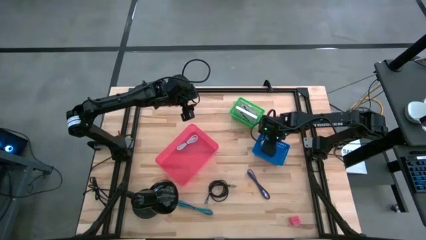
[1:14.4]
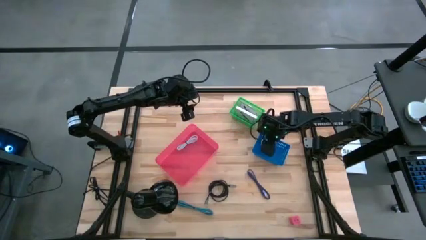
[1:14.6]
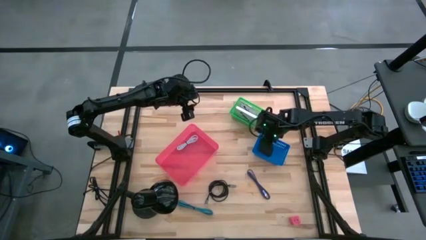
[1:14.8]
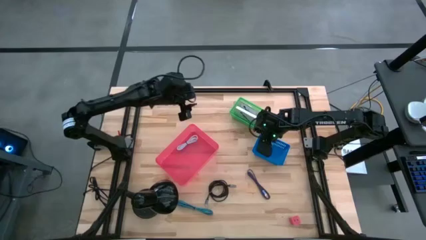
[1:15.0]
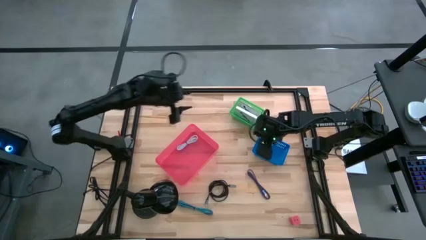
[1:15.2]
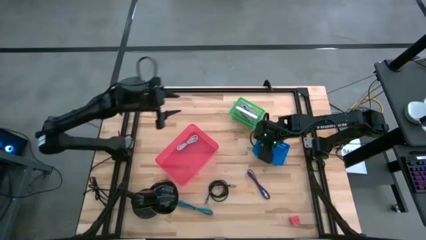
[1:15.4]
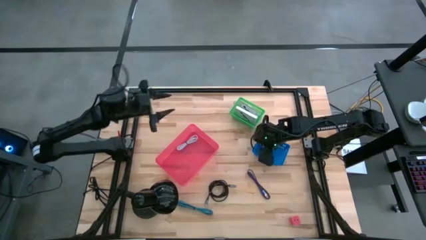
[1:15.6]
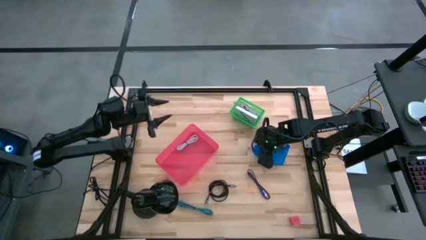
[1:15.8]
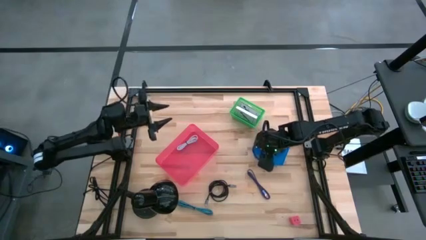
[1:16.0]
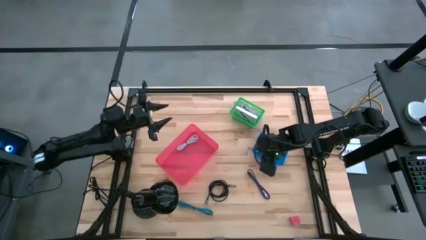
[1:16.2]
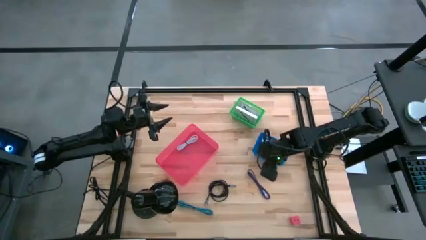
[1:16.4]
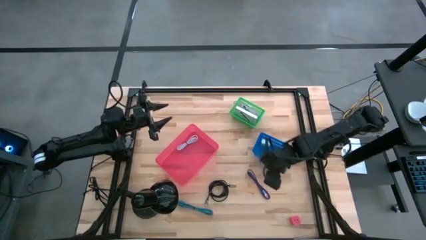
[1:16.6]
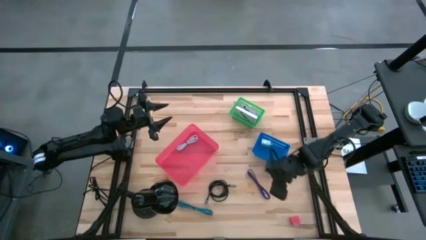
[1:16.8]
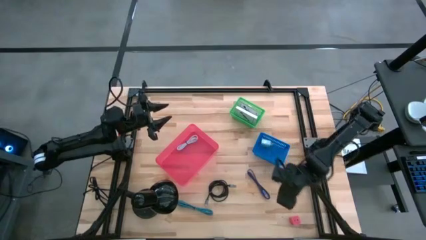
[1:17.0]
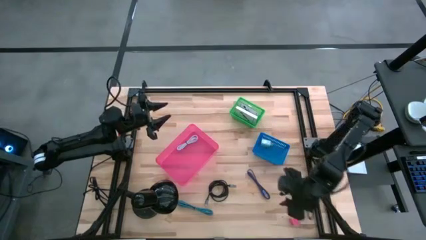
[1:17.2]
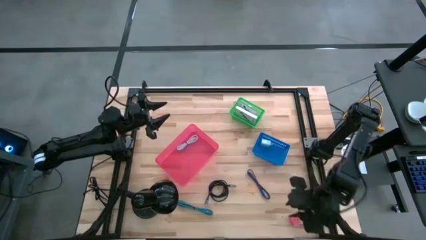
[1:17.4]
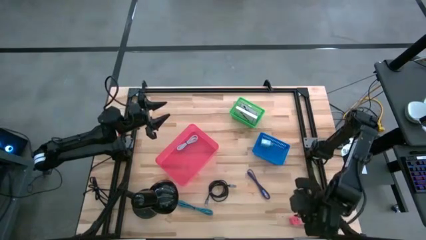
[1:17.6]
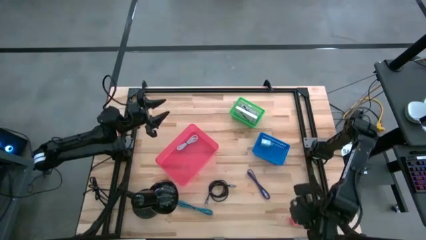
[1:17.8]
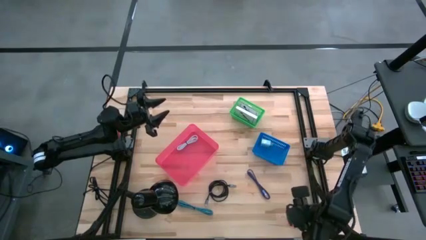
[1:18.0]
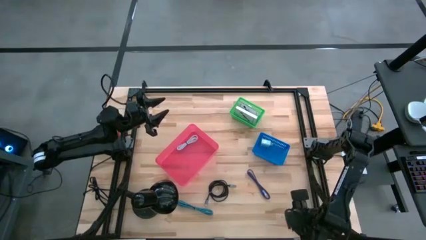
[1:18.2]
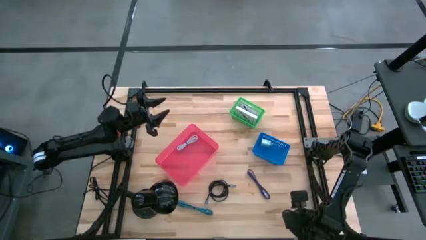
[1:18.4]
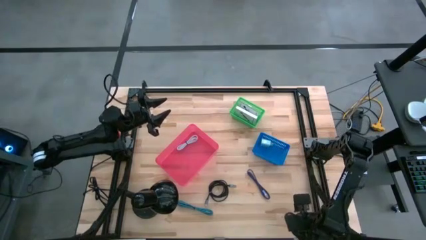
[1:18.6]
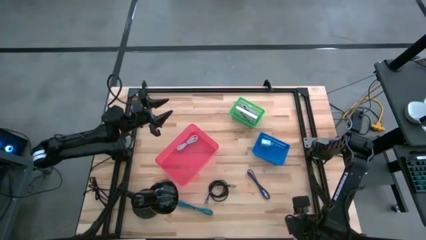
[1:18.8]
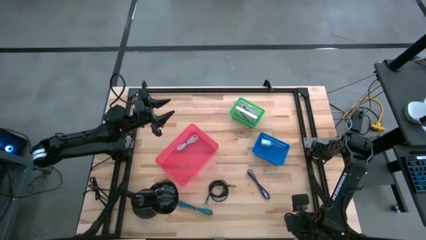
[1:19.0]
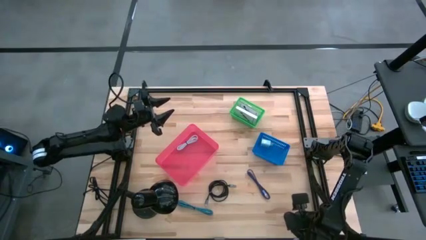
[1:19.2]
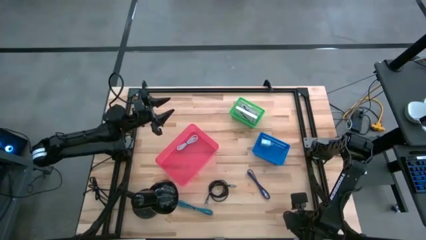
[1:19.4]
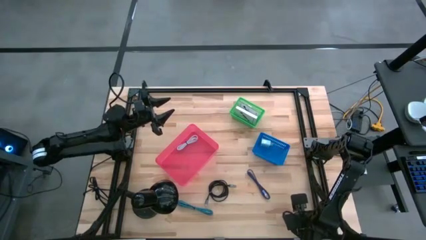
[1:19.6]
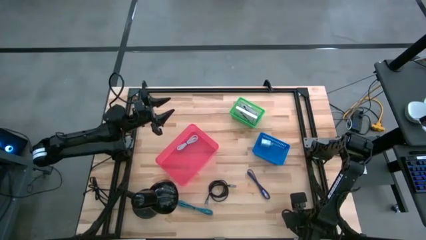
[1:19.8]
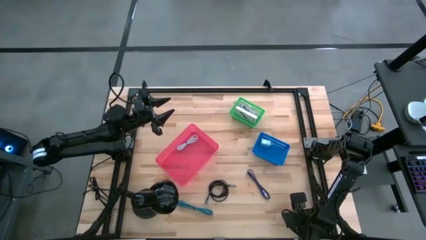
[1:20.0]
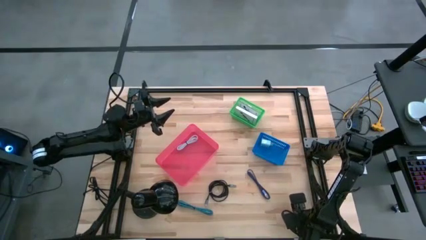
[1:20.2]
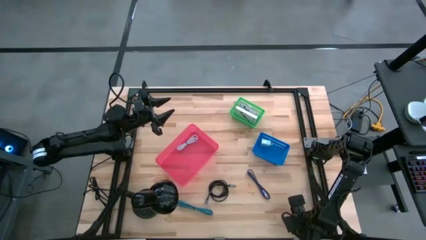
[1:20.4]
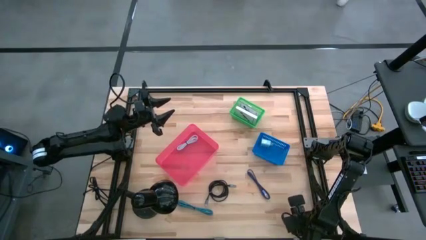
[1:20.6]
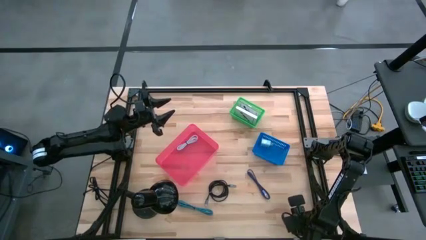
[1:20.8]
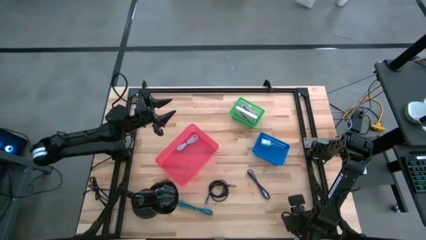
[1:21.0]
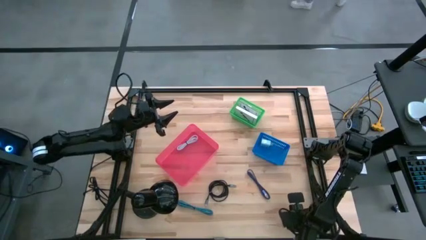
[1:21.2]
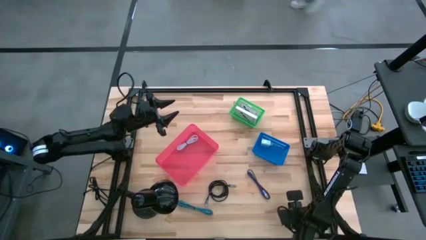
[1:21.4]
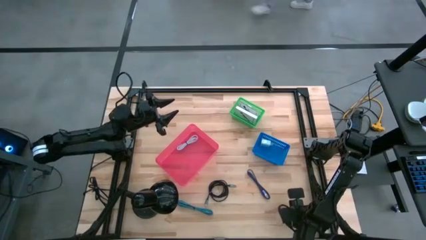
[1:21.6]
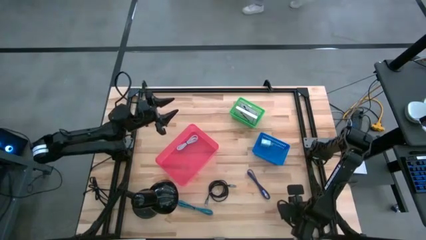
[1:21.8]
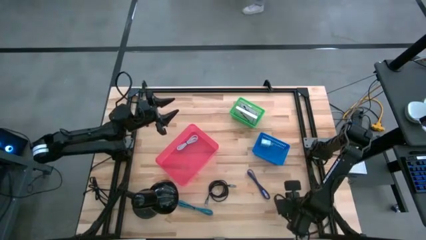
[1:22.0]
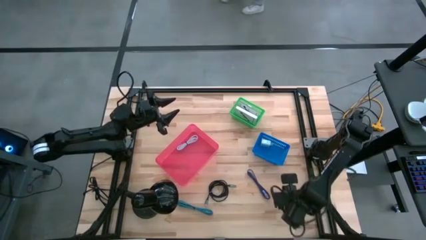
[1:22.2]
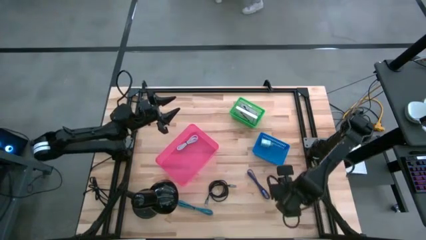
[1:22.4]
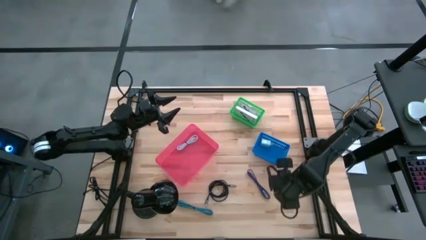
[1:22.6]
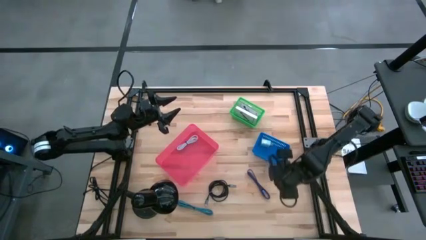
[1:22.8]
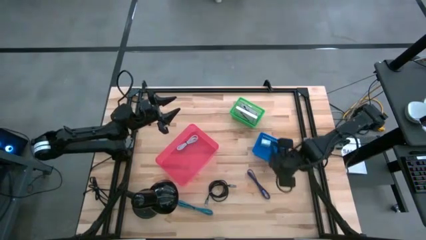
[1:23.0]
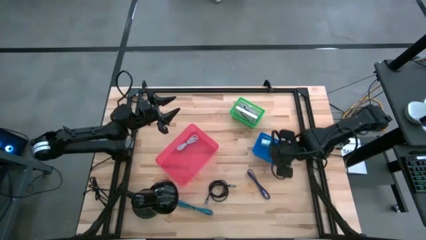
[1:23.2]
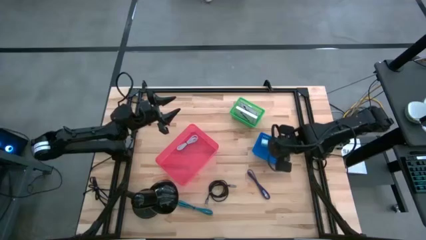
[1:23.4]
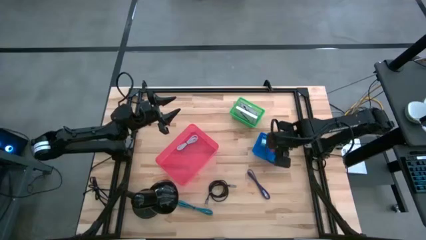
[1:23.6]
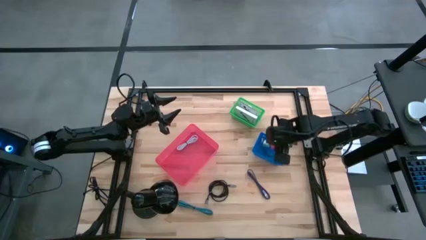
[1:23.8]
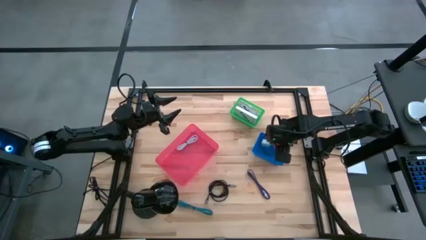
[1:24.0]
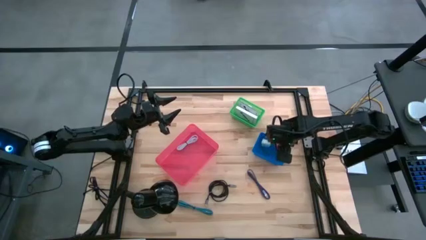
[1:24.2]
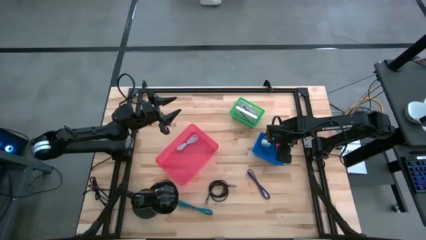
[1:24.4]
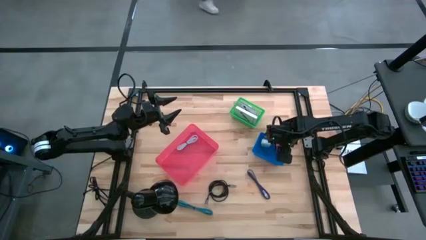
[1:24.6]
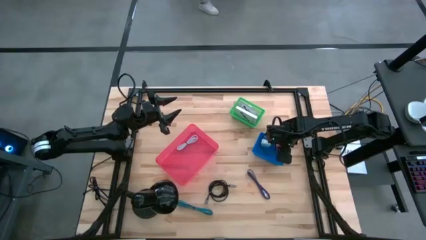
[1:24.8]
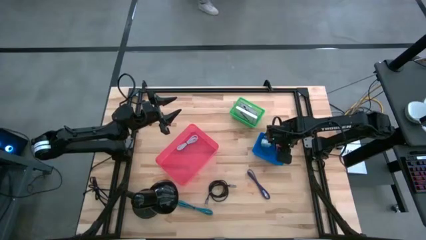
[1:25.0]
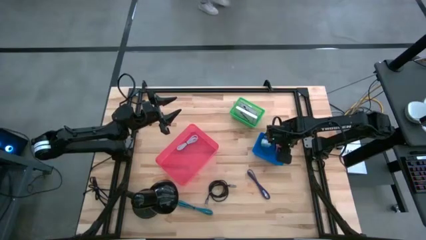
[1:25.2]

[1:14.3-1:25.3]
Task: Pick and place items into bin
Put the pink charger adapter into the blue bin

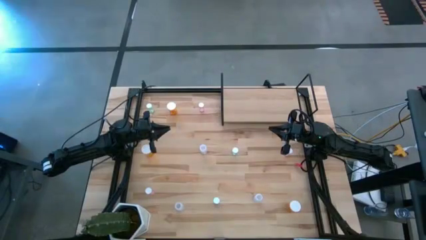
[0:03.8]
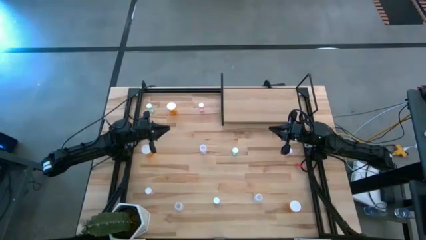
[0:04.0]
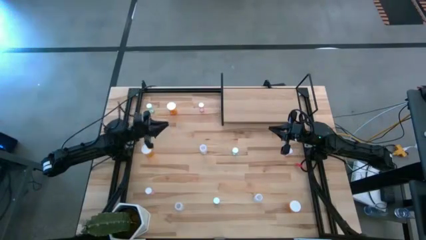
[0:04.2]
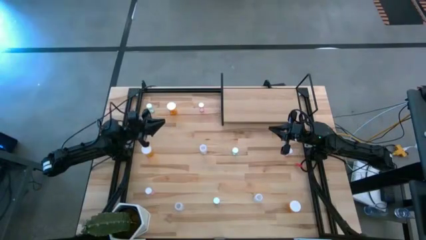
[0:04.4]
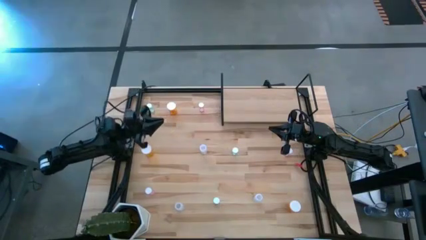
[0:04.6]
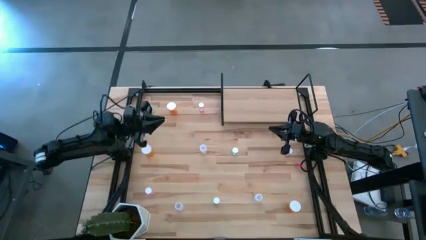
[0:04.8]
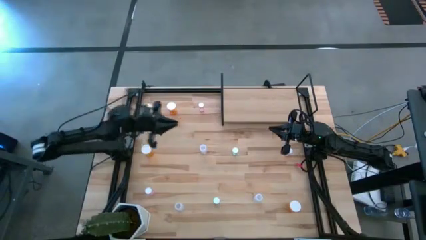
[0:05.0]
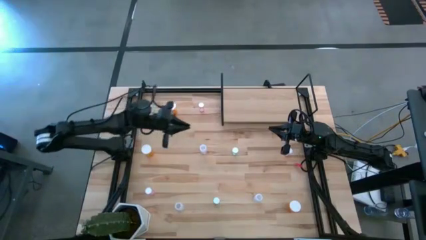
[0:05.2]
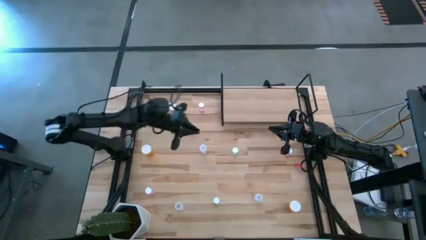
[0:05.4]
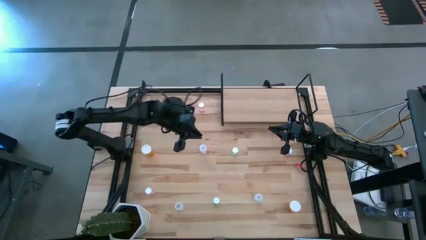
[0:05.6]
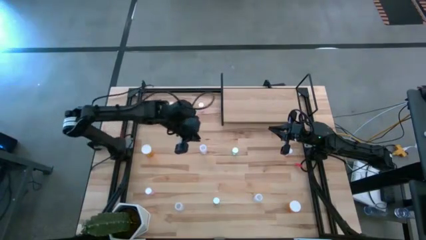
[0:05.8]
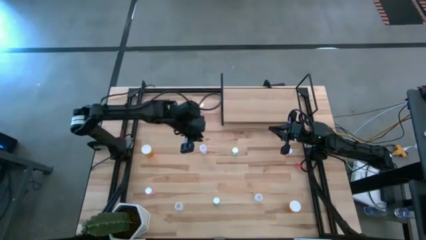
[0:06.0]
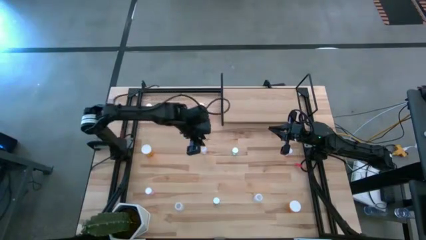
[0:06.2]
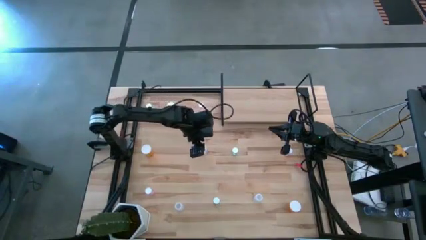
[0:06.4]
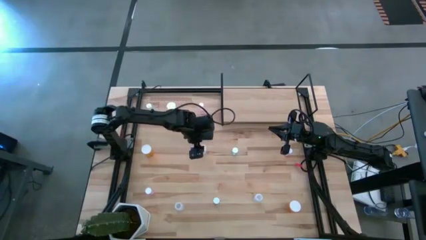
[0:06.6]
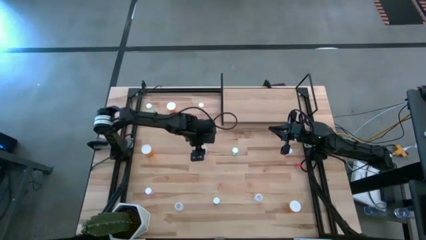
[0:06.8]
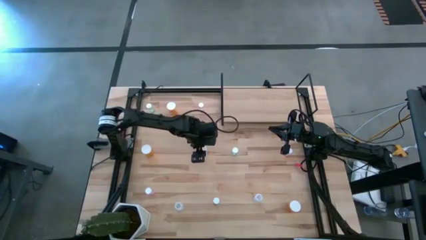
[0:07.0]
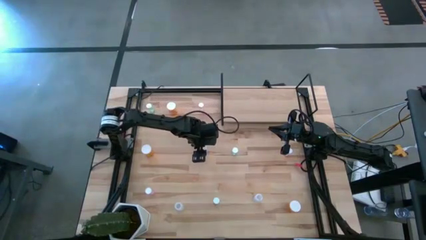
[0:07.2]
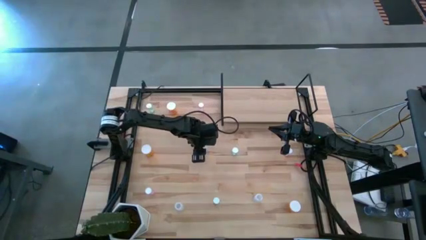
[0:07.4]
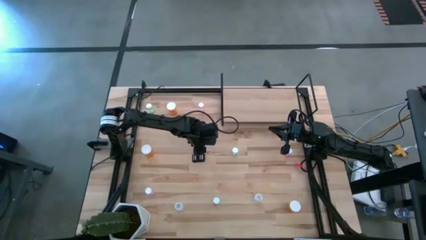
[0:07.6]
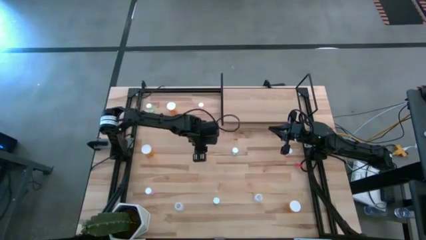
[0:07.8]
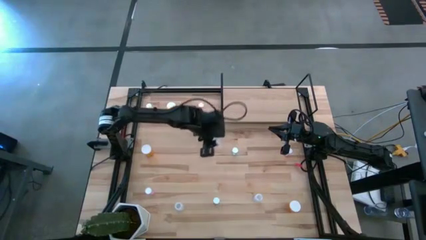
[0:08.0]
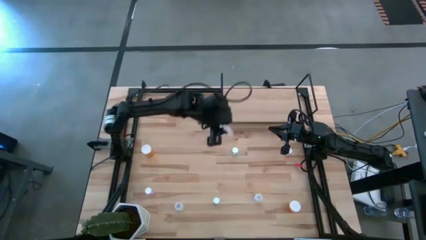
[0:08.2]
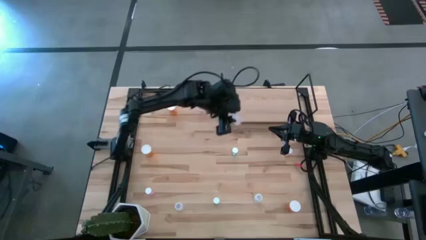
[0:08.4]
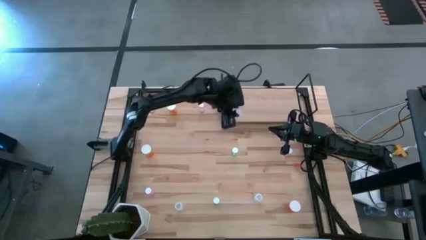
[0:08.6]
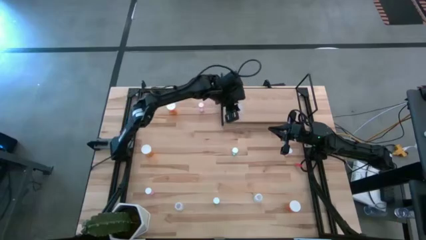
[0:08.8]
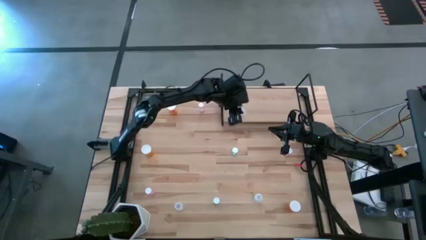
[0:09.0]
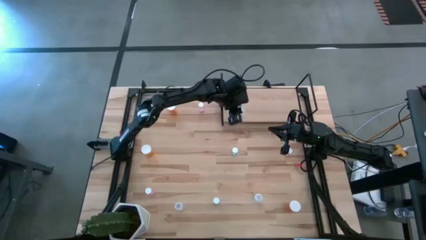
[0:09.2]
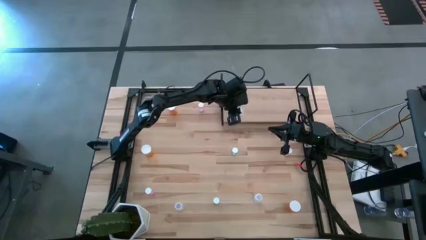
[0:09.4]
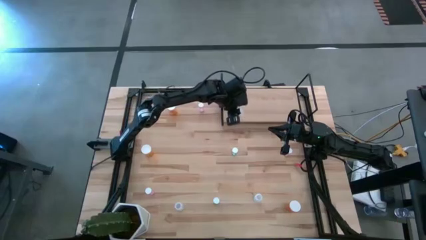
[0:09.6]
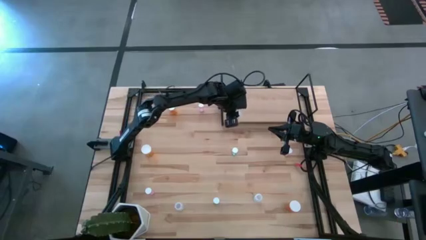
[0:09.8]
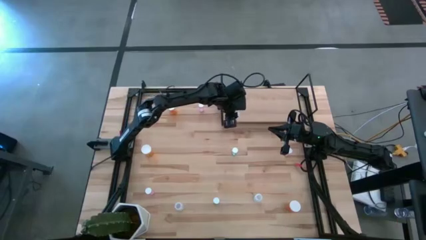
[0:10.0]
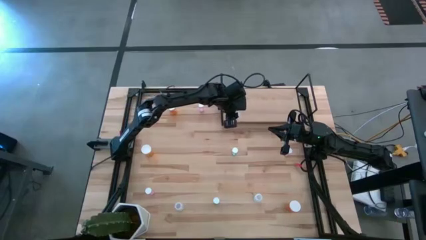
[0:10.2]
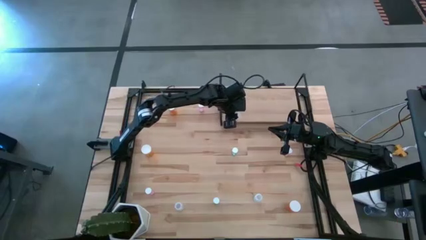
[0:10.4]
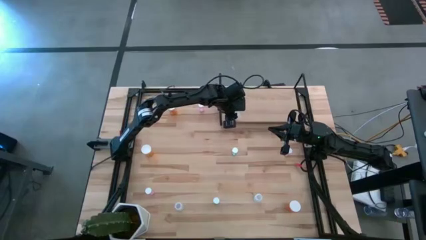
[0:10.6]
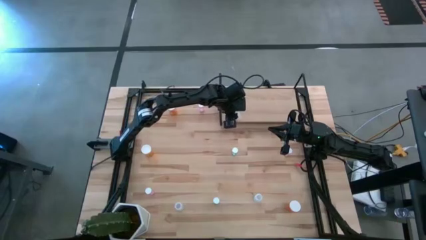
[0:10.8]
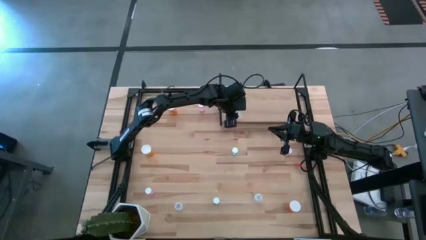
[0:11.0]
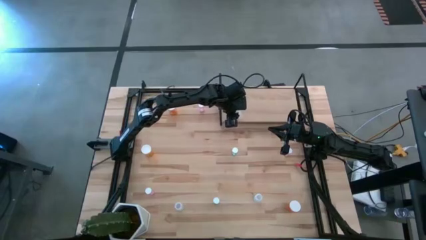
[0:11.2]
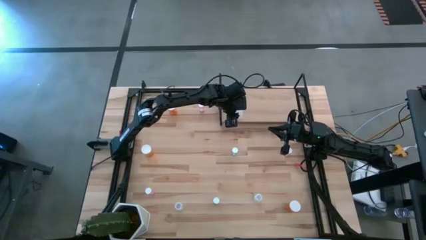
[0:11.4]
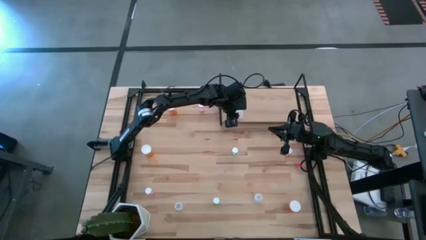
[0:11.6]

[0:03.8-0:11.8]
Task: Pick and place medicine bottles onto shelf by color
Put the top transparent pill bottle on the shelf
